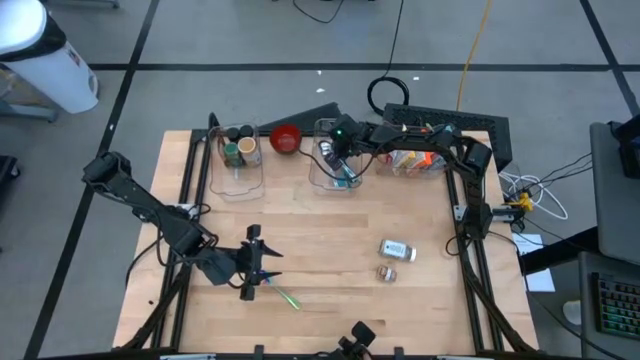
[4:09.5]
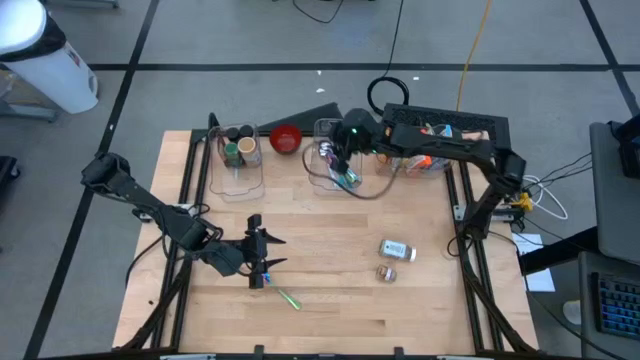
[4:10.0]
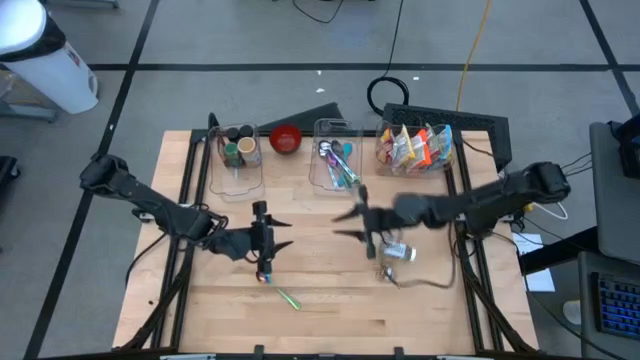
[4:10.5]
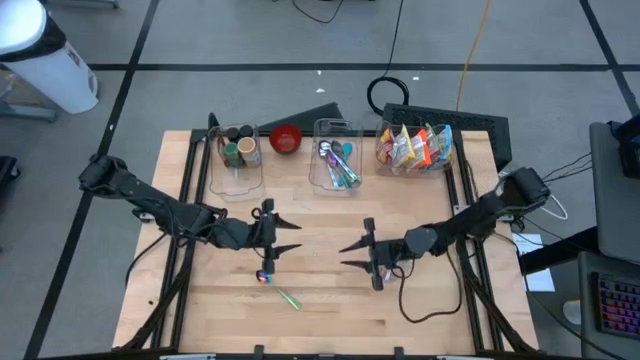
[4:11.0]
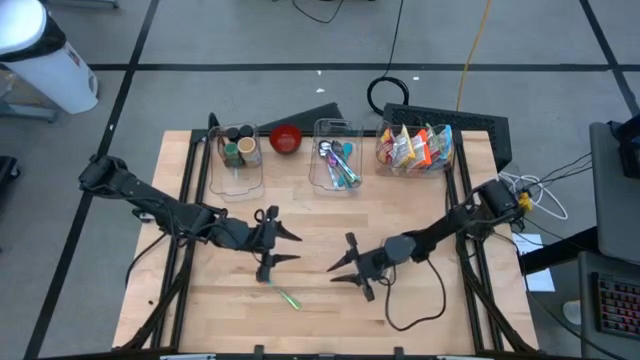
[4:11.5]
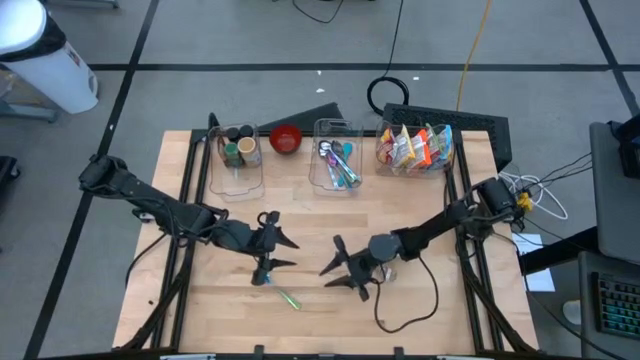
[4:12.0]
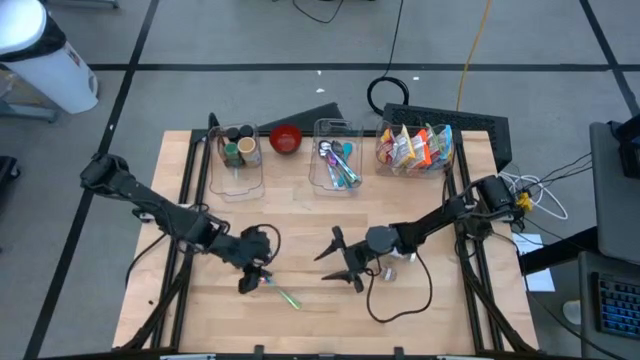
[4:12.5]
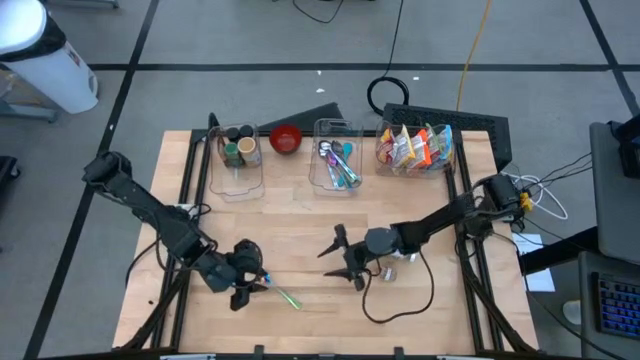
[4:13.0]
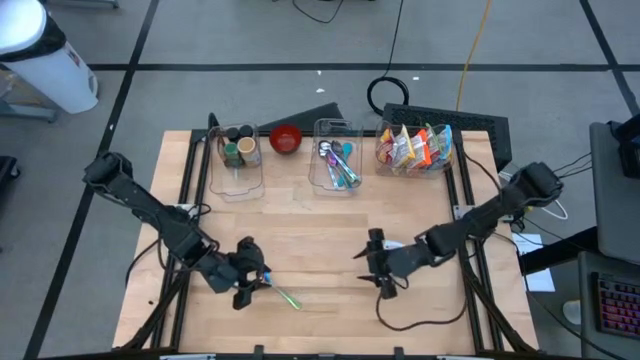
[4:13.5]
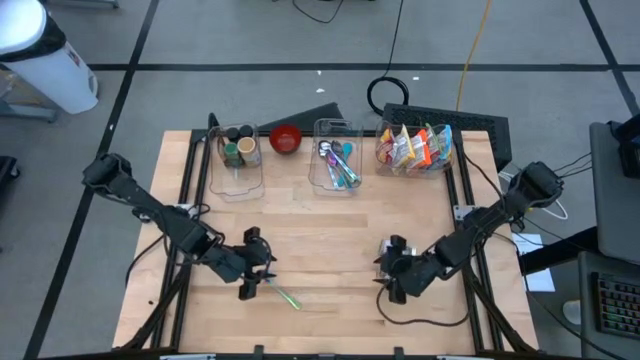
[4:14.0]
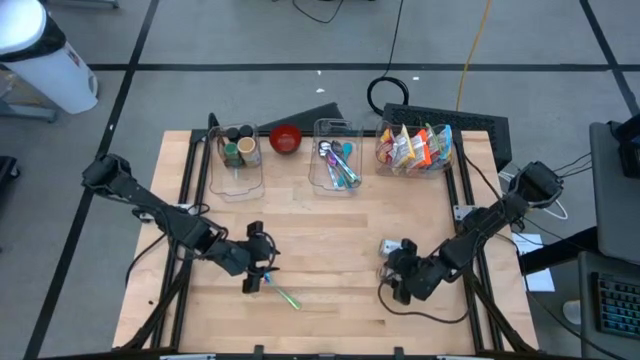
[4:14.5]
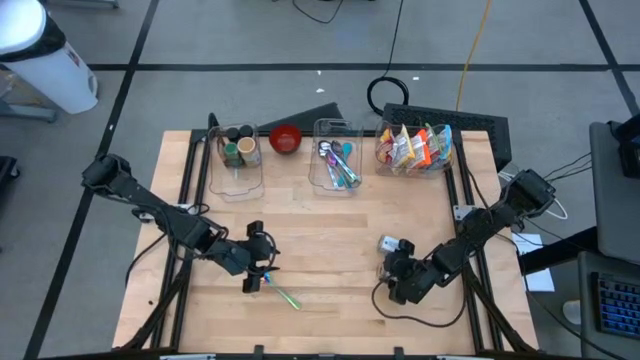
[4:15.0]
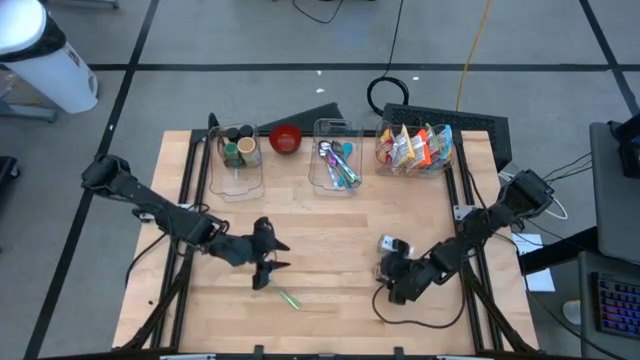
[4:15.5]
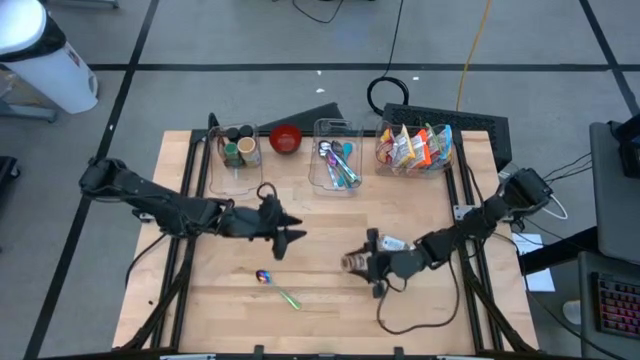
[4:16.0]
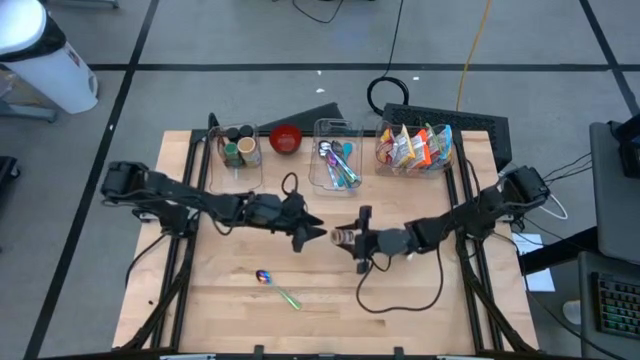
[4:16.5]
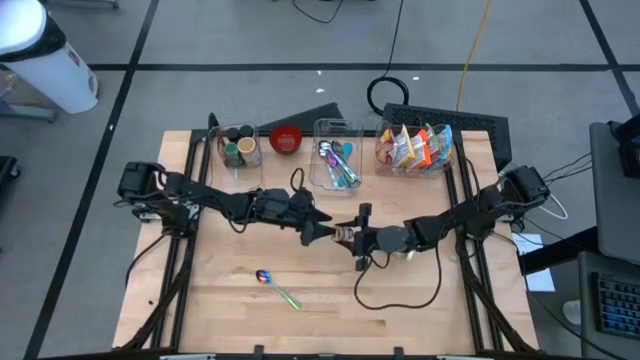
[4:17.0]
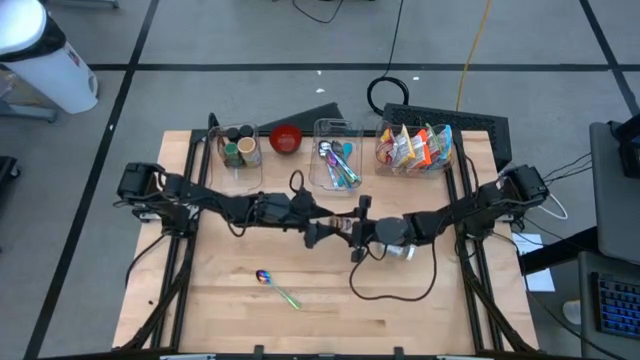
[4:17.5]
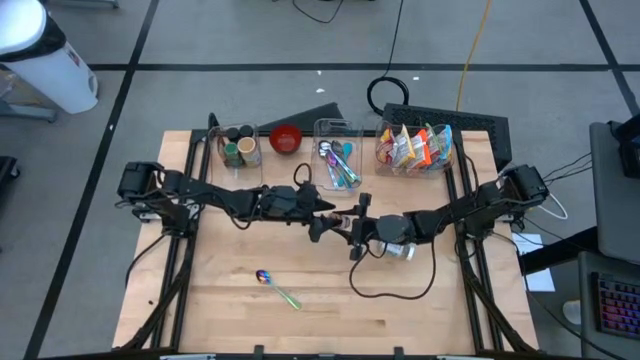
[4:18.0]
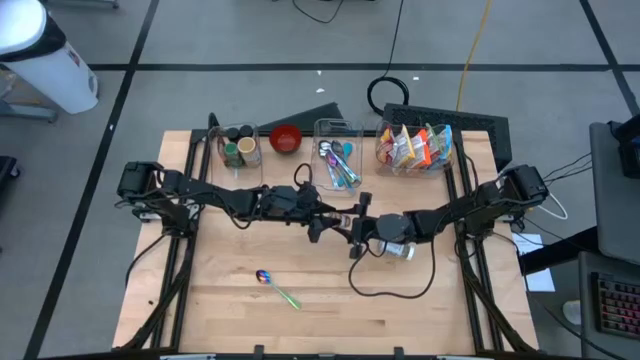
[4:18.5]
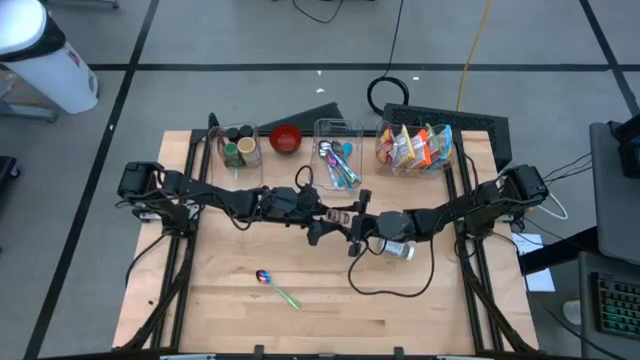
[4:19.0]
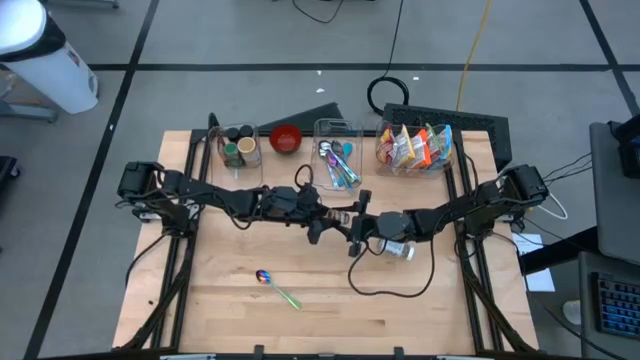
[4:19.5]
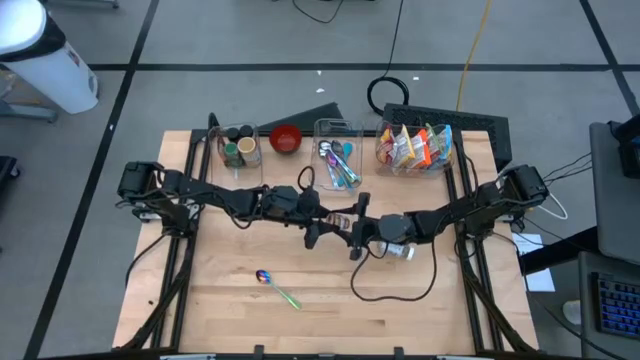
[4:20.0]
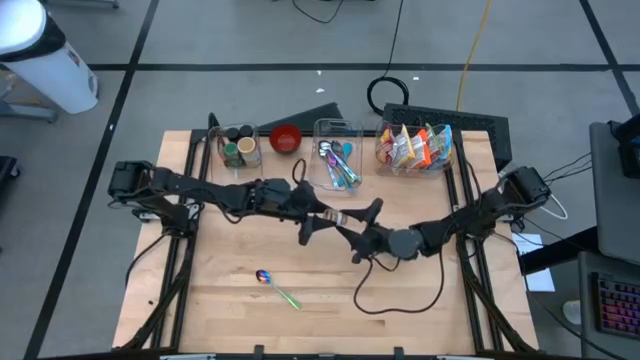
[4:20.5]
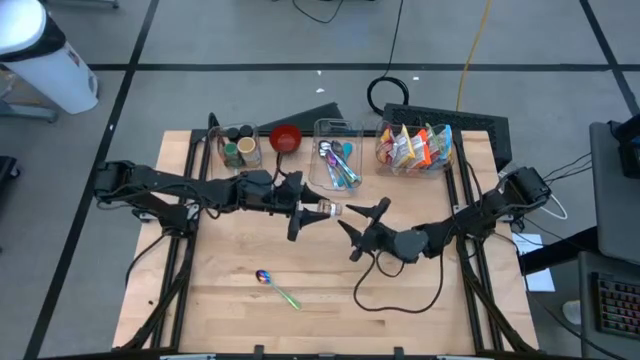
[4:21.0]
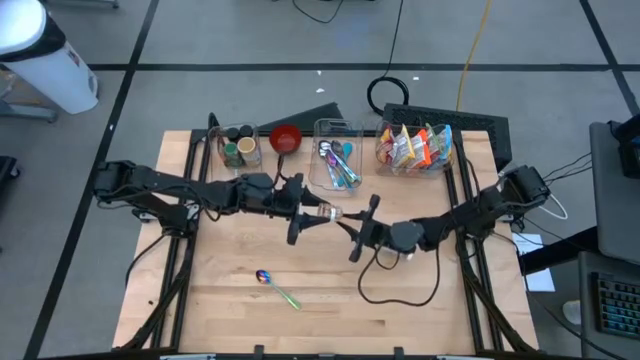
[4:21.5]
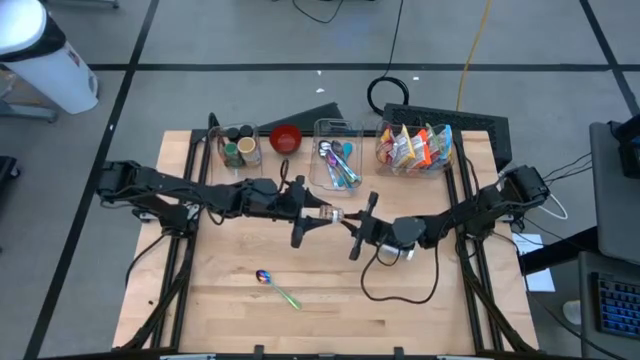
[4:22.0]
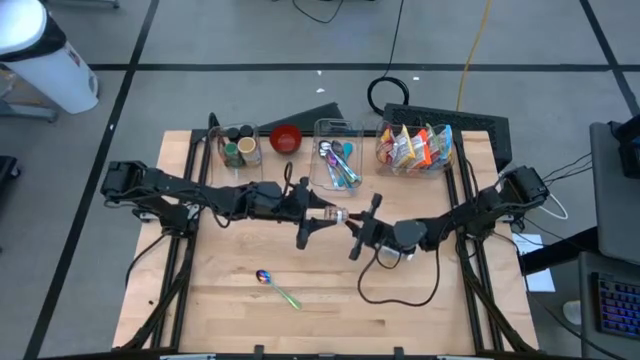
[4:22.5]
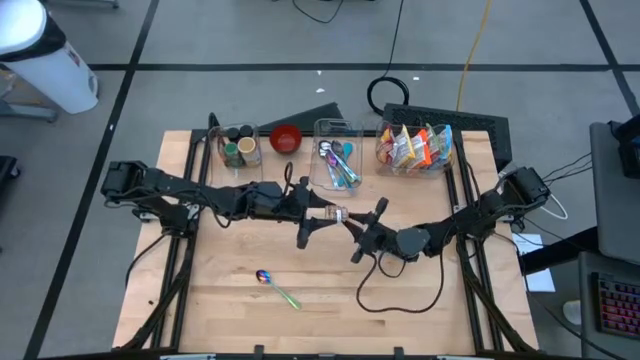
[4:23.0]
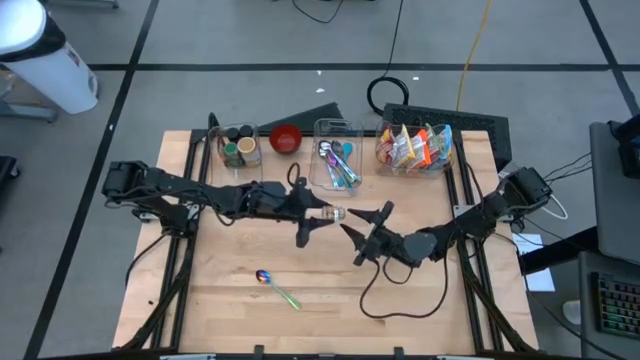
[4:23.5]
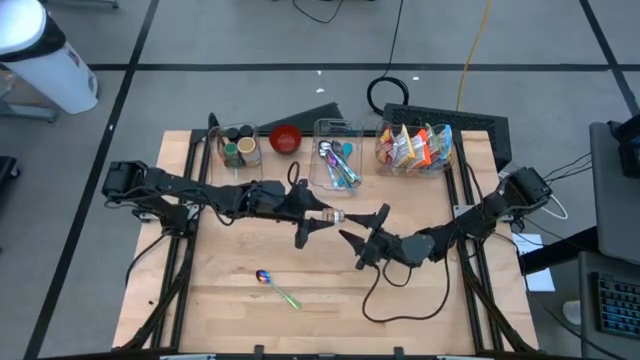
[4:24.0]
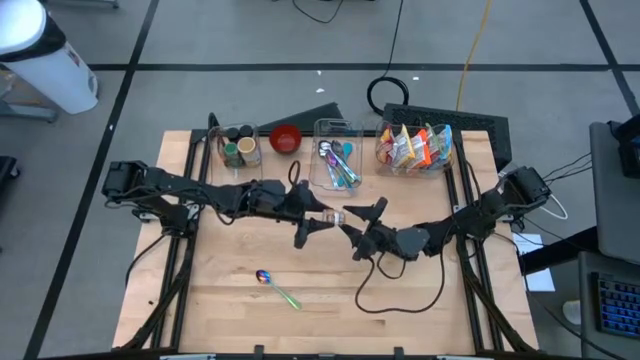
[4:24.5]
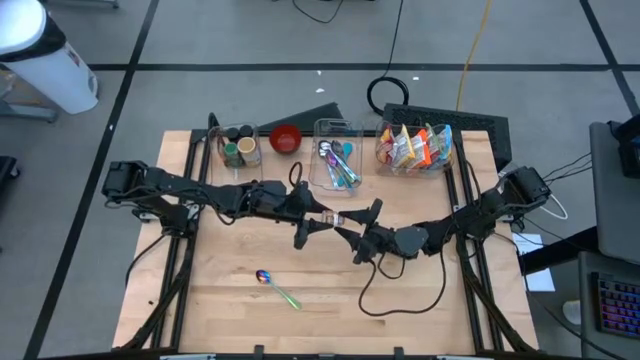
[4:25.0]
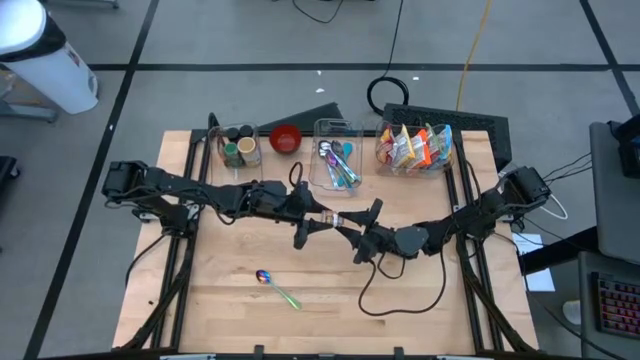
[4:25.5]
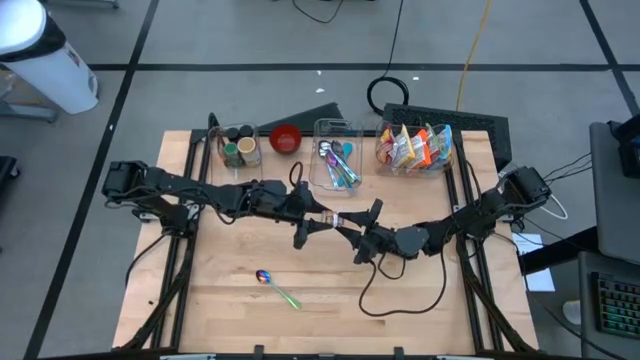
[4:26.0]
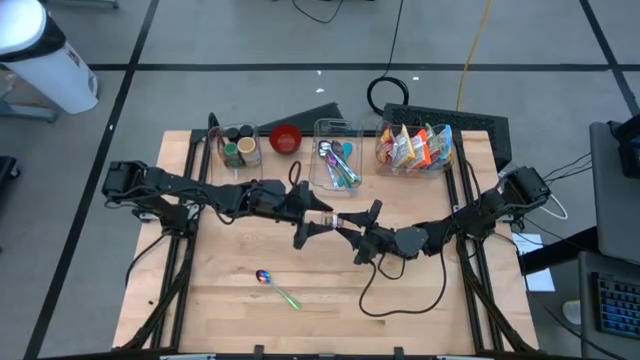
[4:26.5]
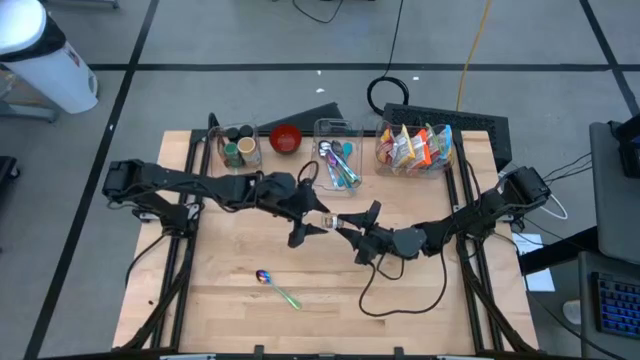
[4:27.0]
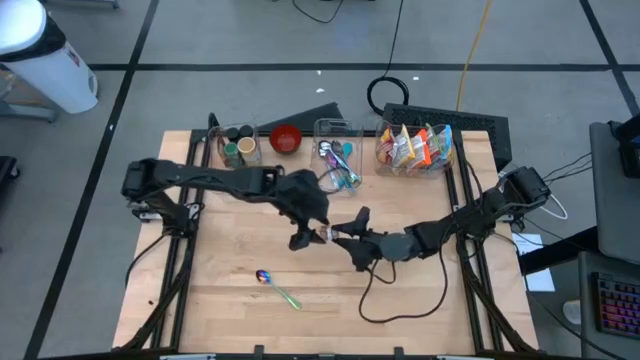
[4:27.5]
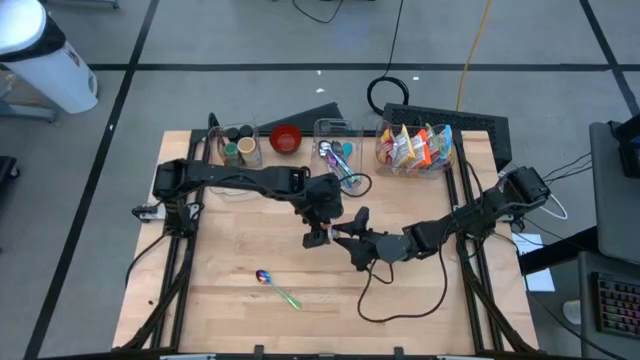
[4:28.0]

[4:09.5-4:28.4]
Task: Pick & Place Food Item
Put the yellow and white seasoning bottle into the left transparent bin

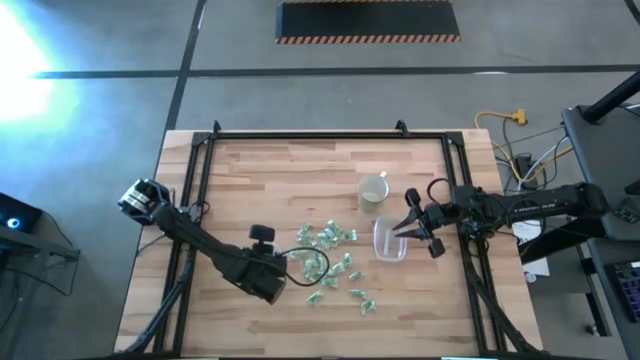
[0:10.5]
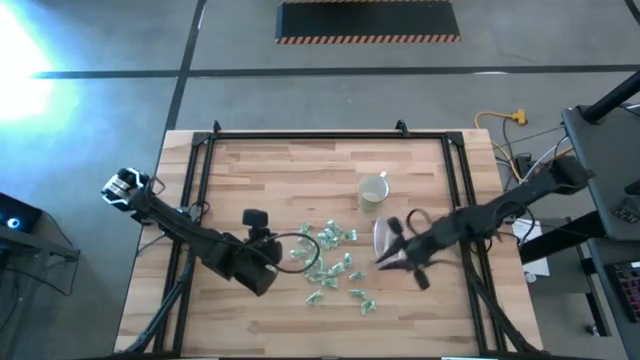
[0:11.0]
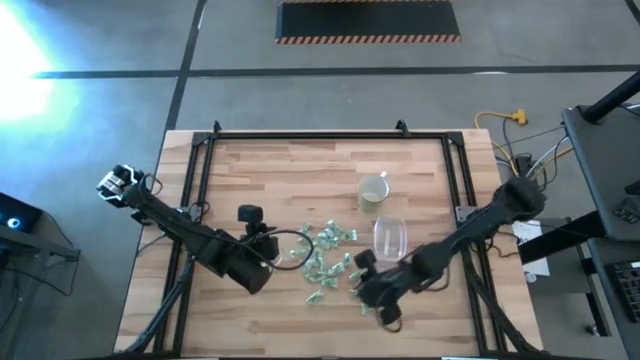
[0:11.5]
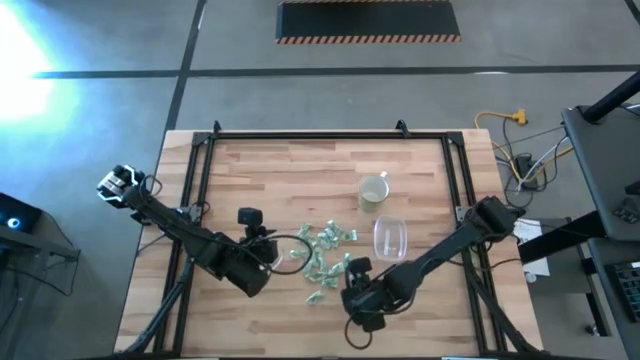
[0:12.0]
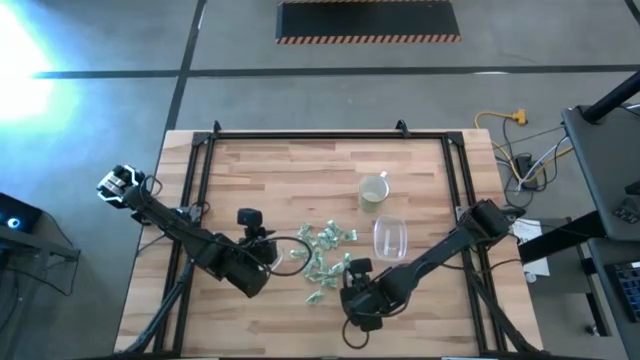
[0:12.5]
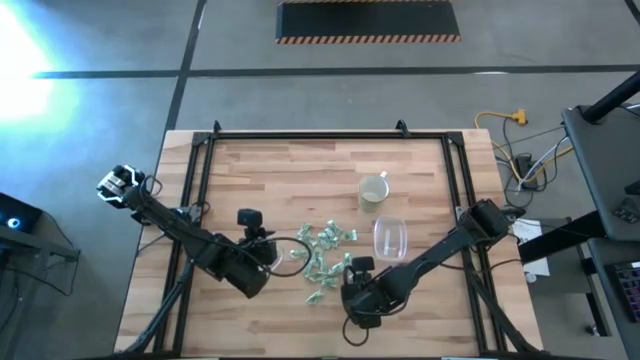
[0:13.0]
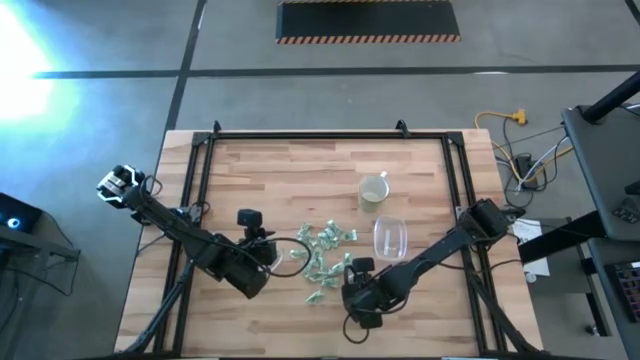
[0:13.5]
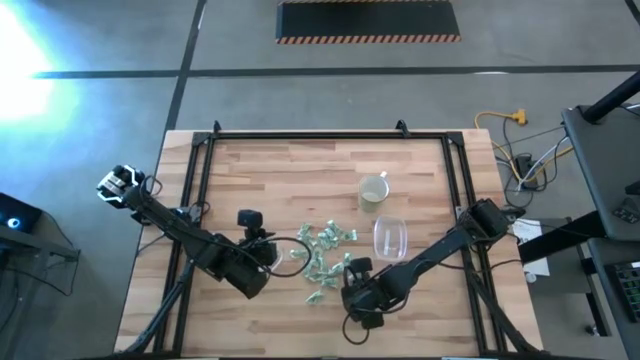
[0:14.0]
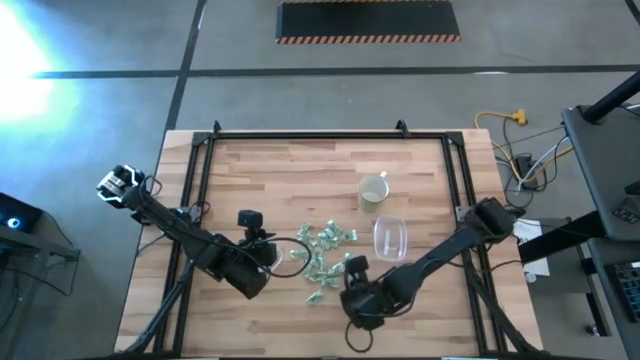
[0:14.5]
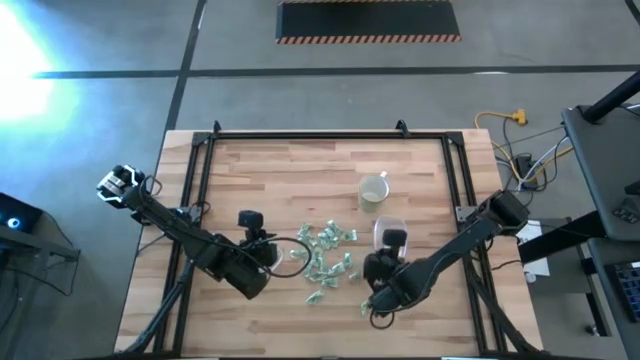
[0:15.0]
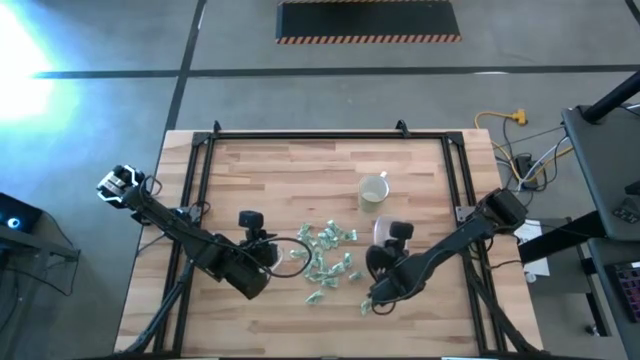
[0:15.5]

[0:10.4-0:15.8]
Task: Pick and place Stevia / Truvia into bins
Put the stevia packet into the right transparent container
